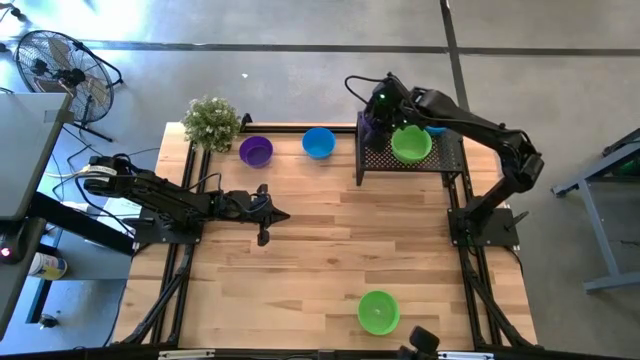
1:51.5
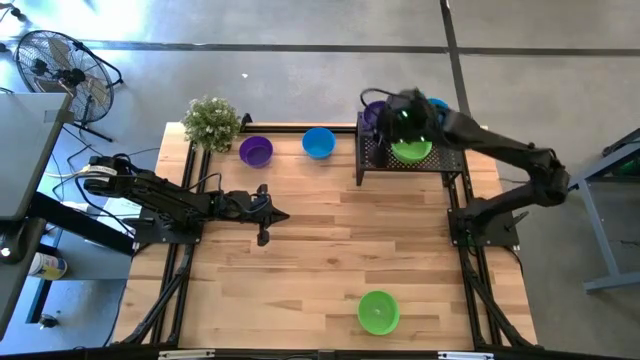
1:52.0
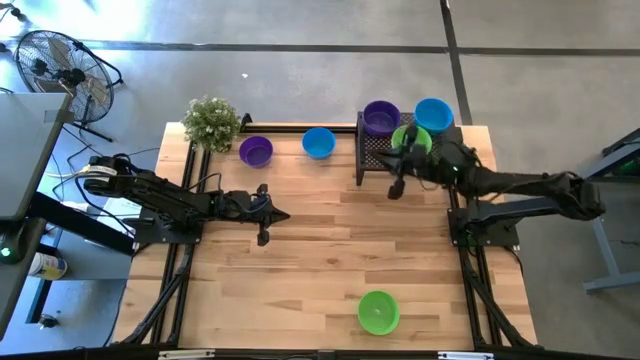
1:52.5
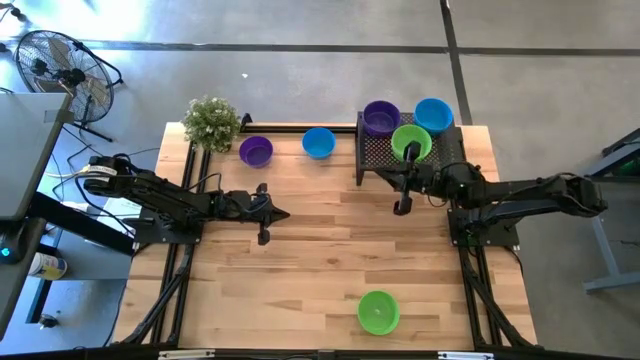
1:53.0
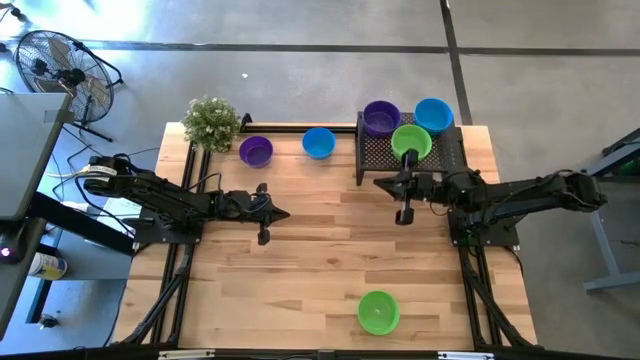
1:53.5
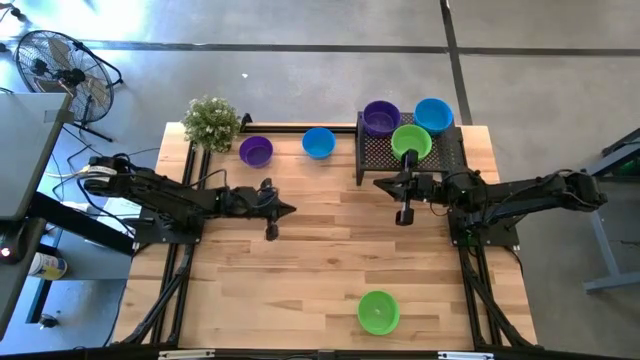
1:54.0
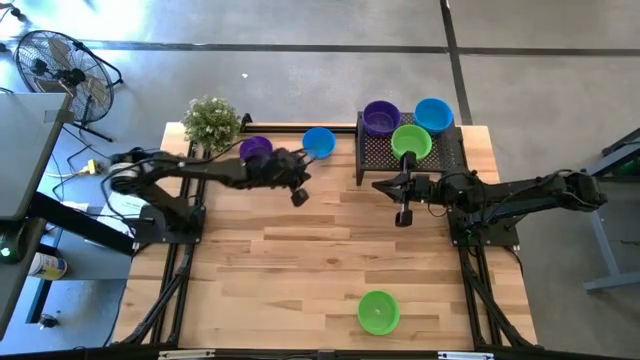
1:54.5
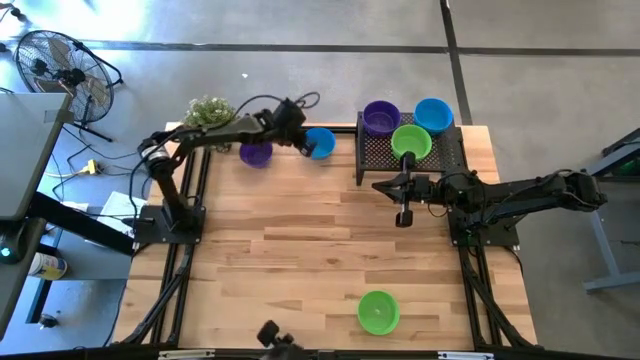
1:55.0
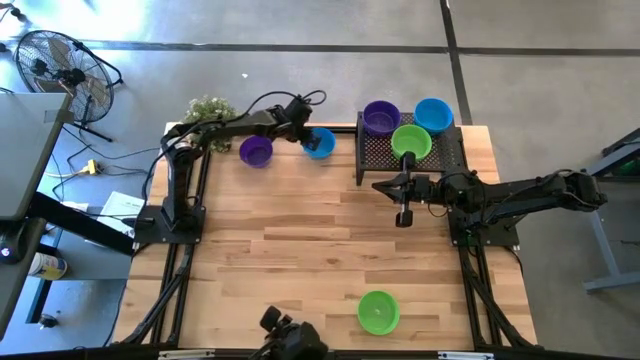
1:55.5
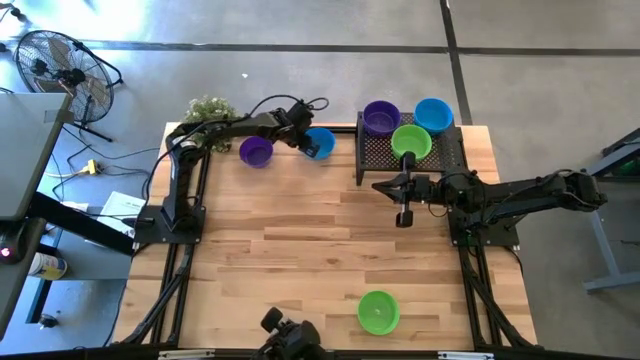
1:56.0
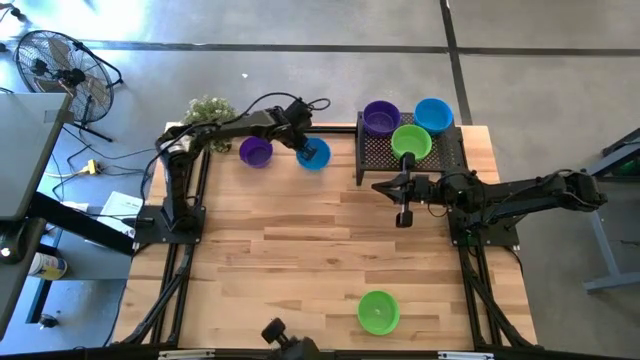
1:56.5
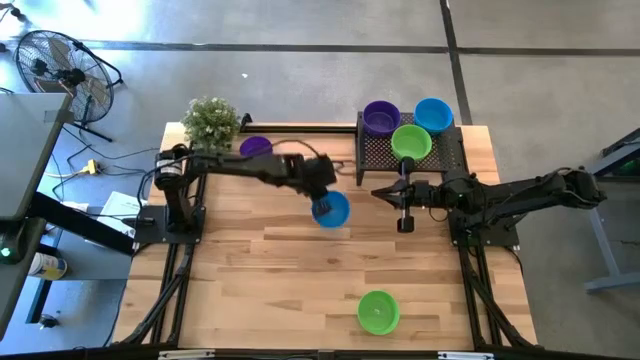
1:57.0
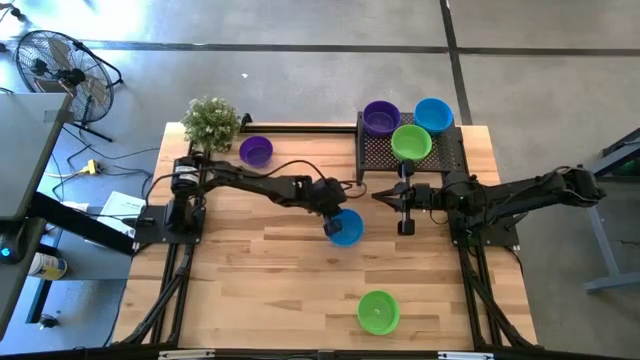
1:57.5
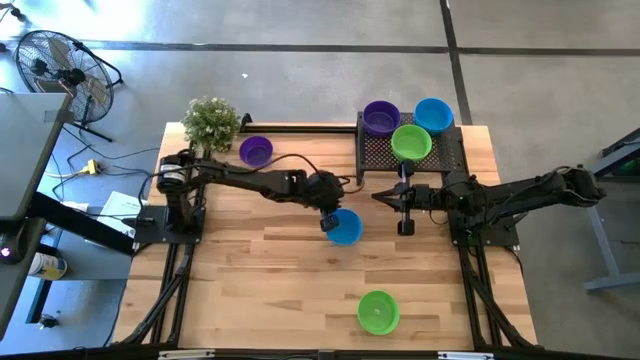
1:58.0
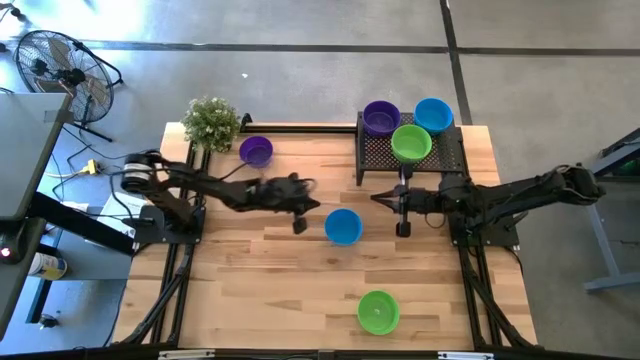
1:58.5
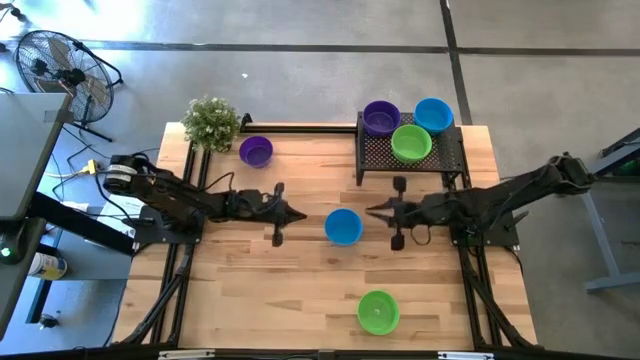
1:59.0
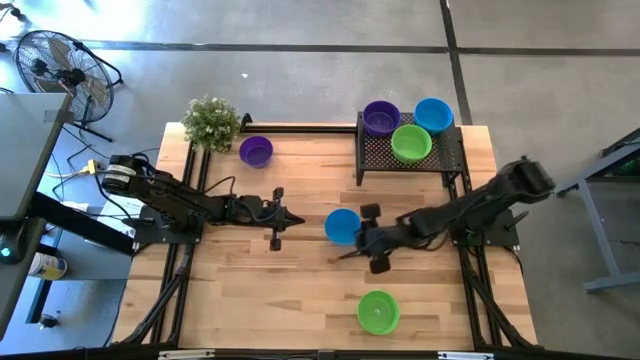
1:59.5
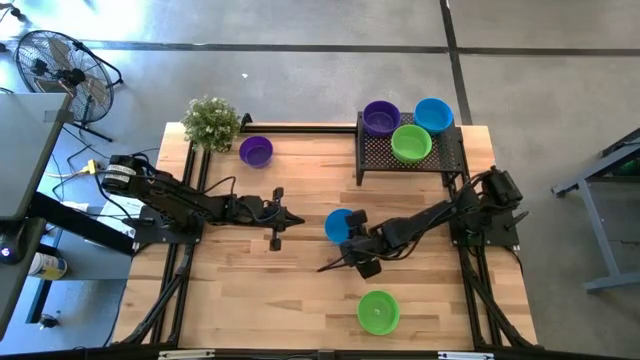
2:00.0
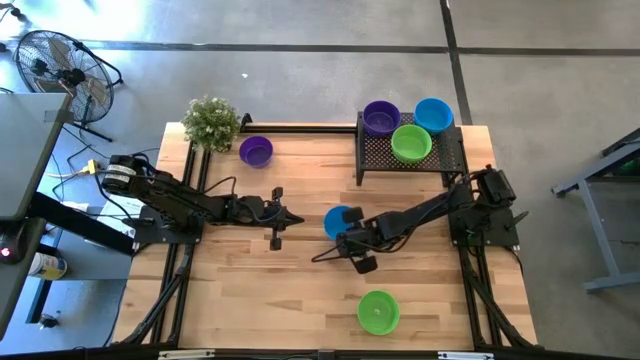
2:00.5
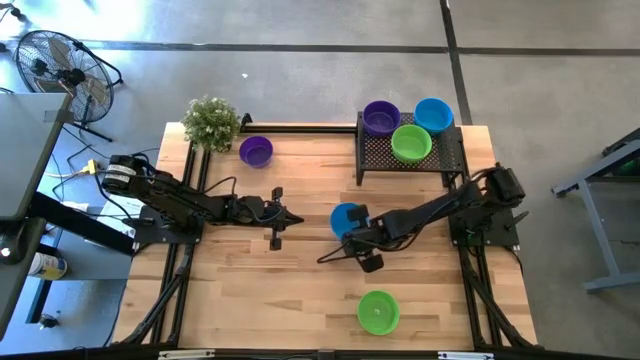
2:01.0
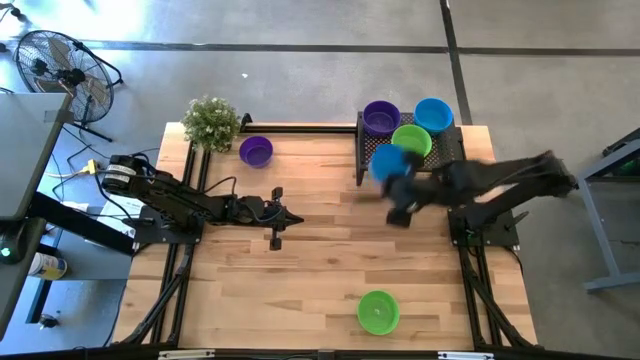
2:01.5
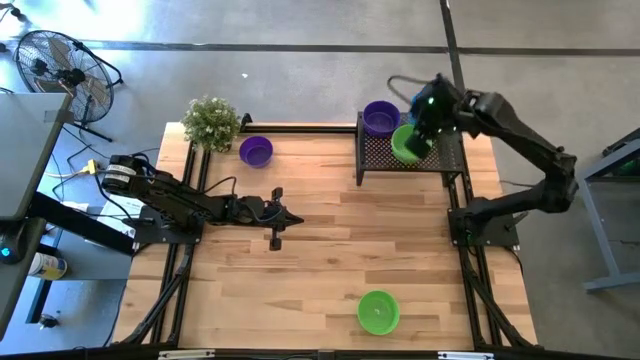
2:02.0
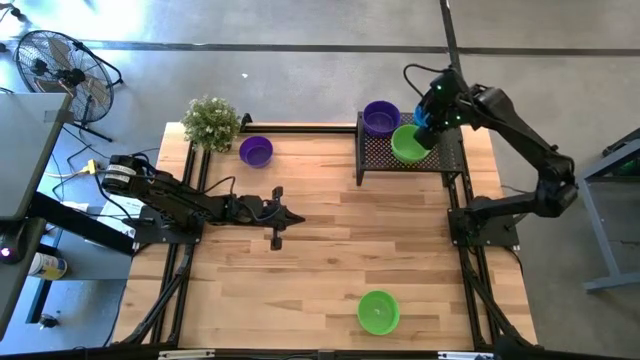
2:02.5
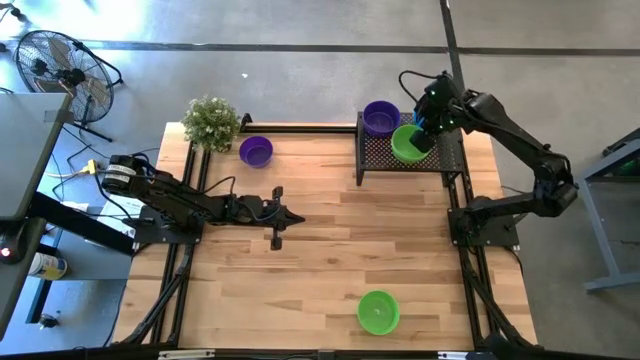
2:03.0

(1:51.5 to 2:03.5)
Task: Pick & Place Mini bowls
Stack the blue bowl on the other blue bowls on the shelf

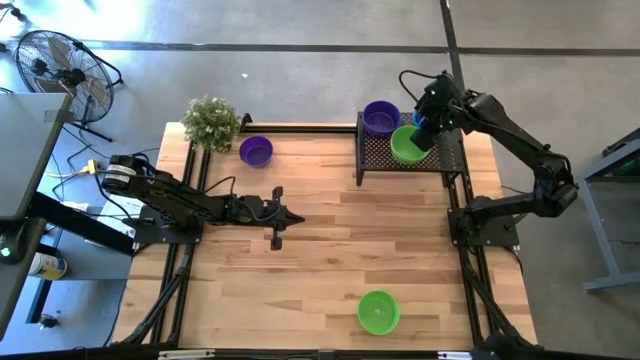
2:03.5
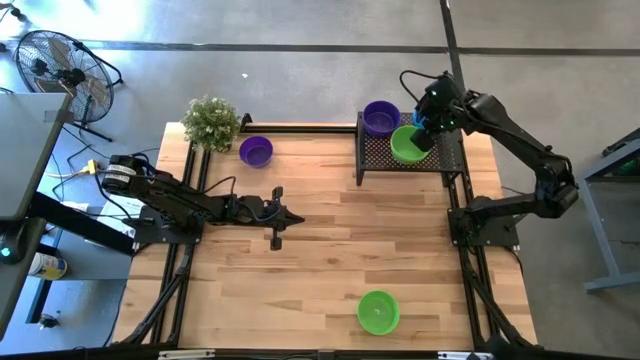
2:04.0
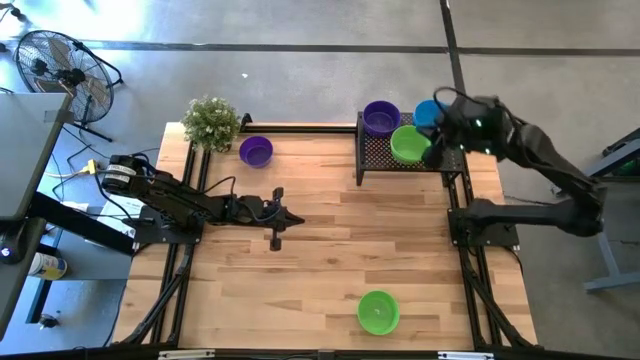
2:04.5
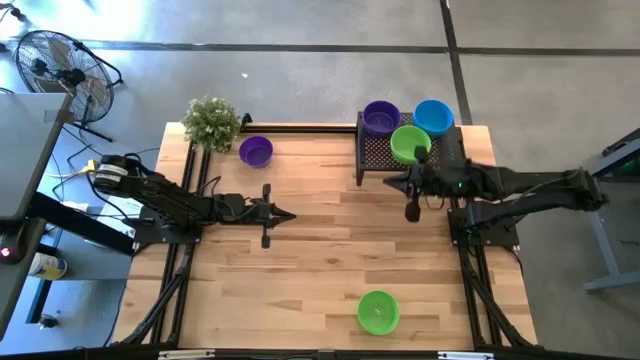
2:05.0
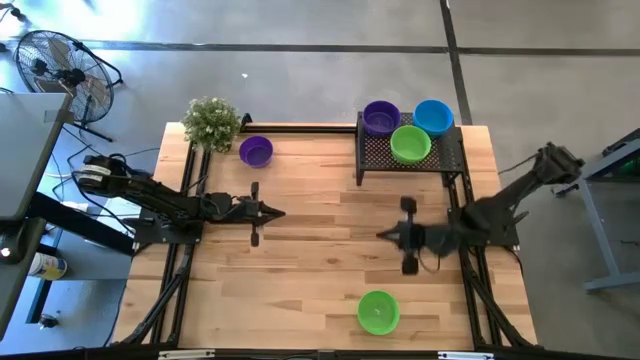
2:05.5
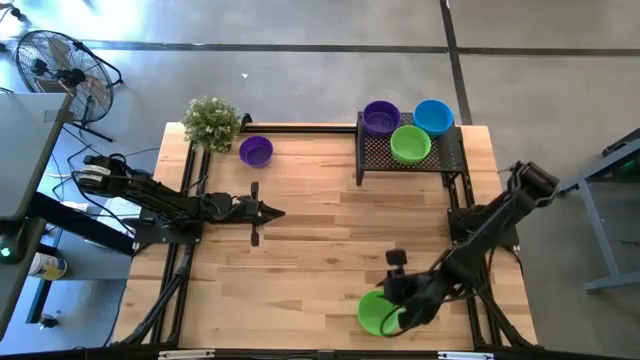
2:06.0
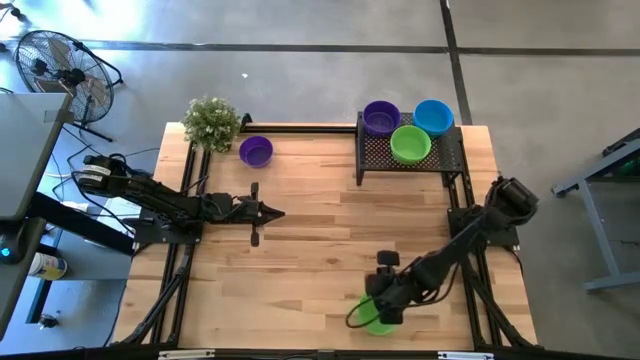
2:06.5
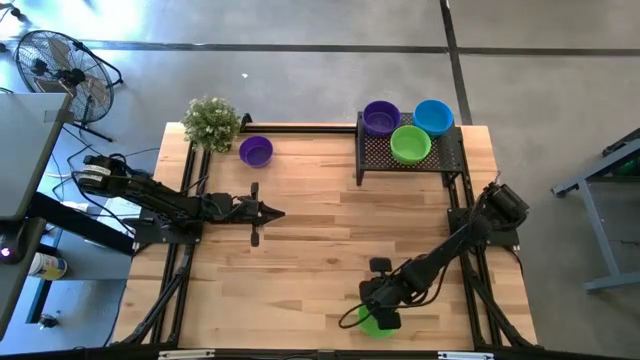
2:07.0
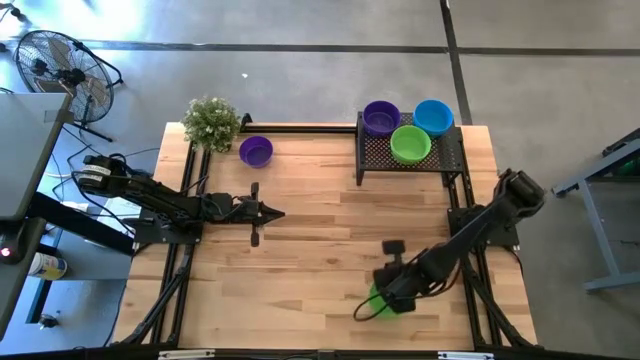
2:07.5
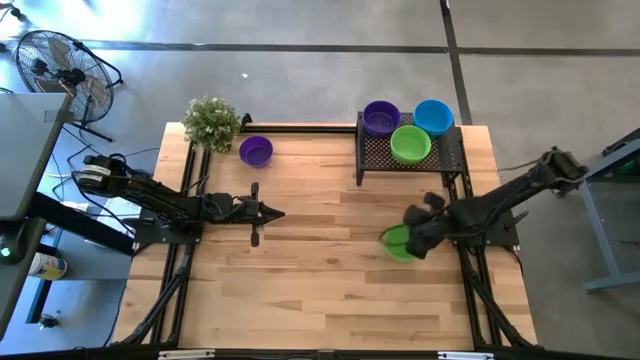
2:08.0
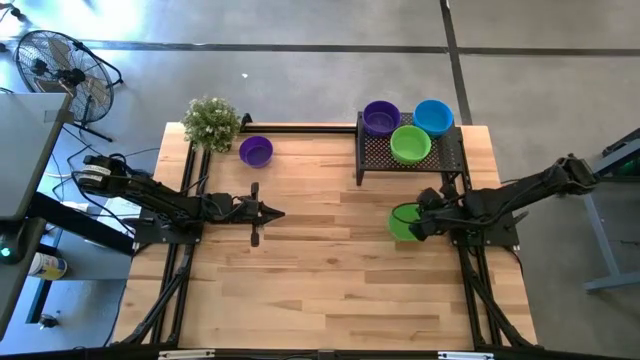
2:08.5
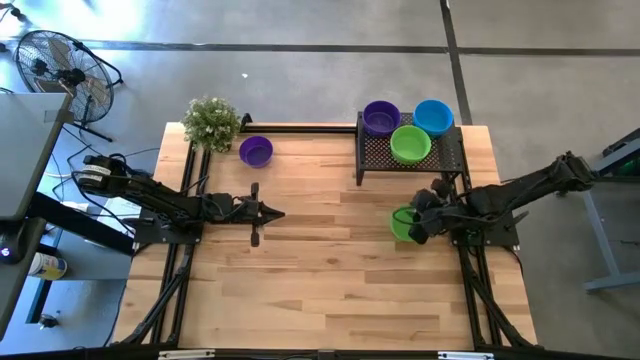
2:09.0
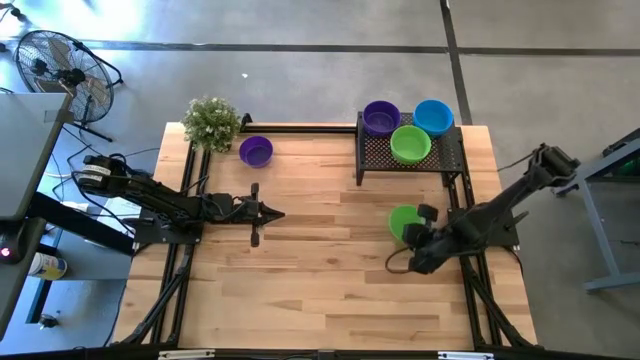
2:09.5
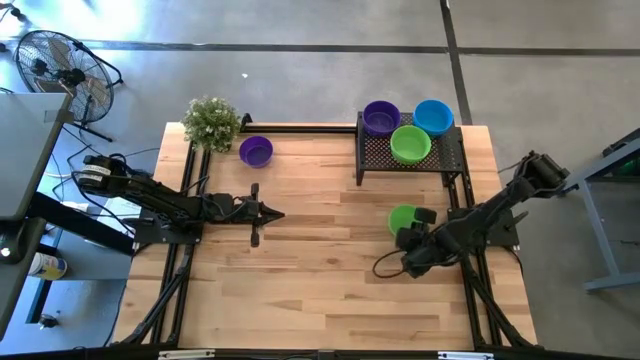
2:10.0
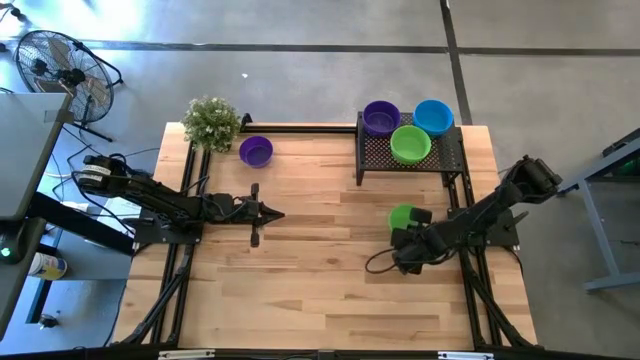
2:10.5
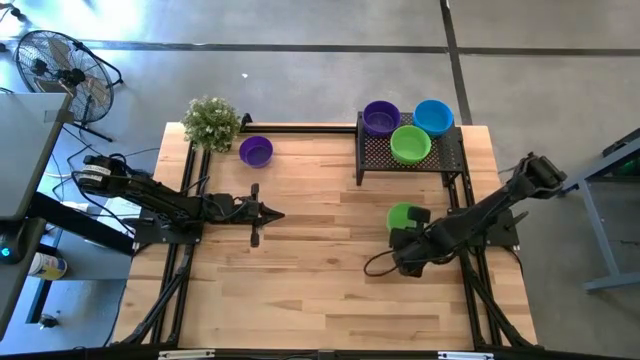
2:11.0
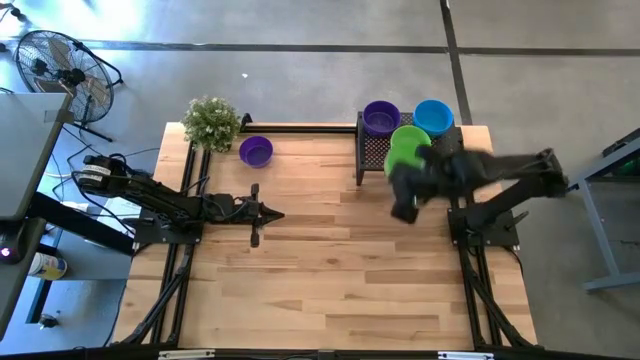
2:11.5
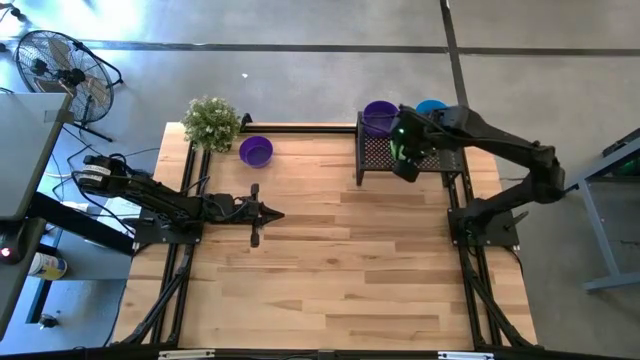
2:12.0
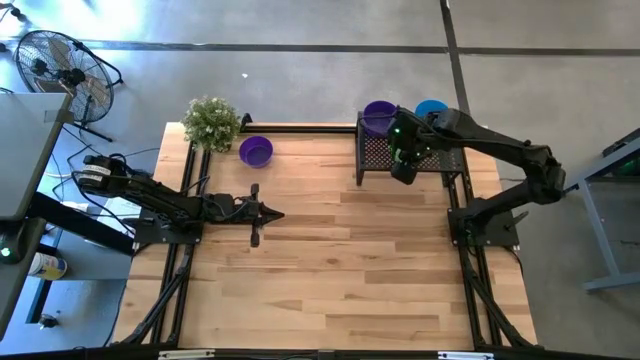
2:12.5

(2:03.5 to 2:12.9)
Stack the green bowl on the other green bowls on the shelf
